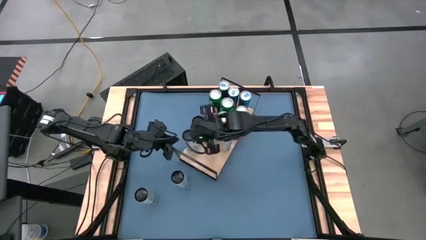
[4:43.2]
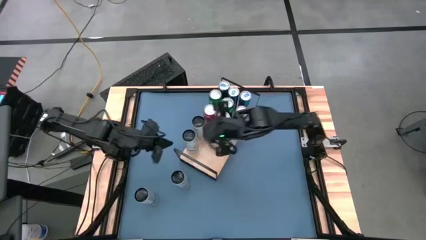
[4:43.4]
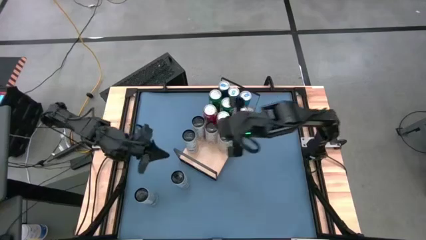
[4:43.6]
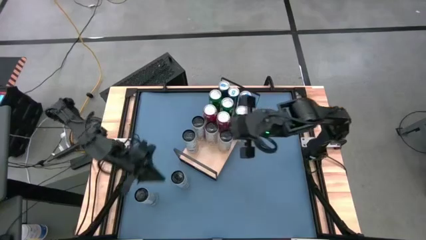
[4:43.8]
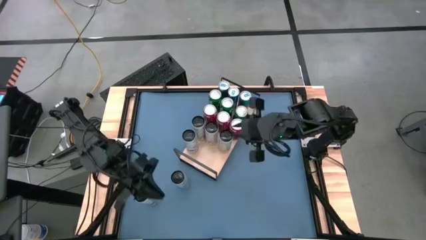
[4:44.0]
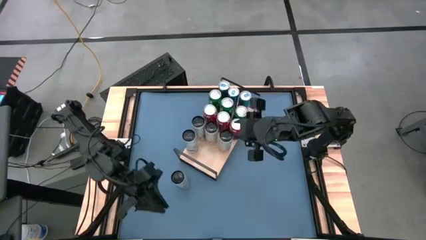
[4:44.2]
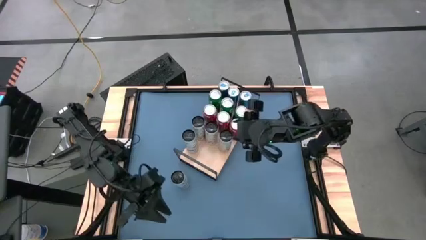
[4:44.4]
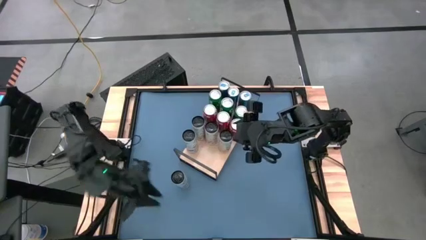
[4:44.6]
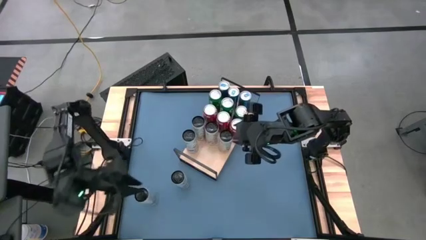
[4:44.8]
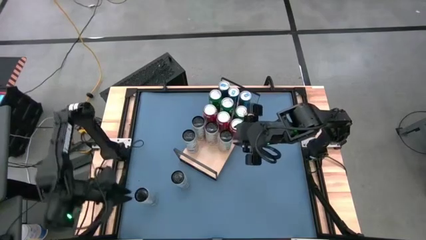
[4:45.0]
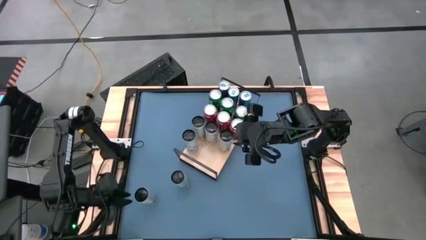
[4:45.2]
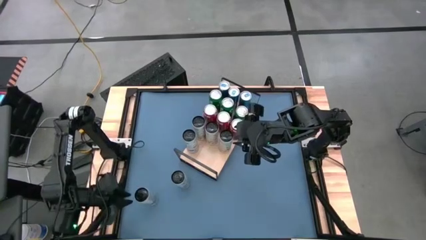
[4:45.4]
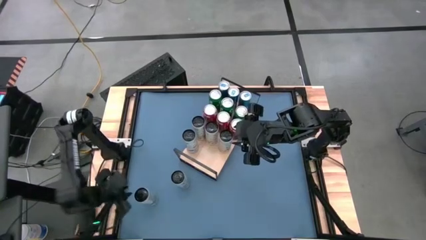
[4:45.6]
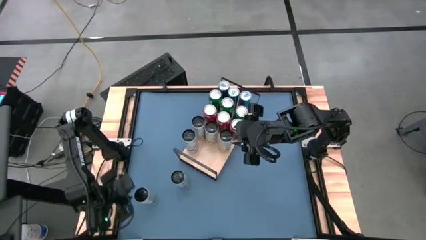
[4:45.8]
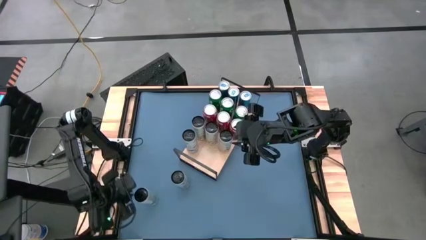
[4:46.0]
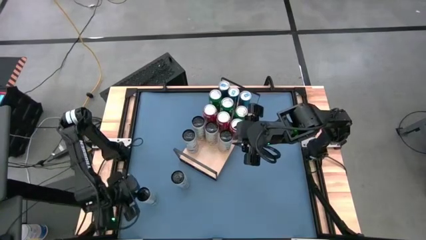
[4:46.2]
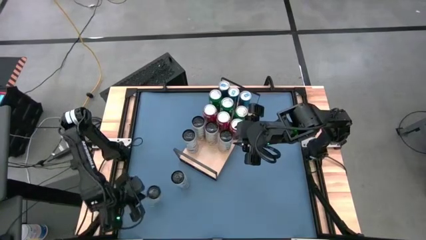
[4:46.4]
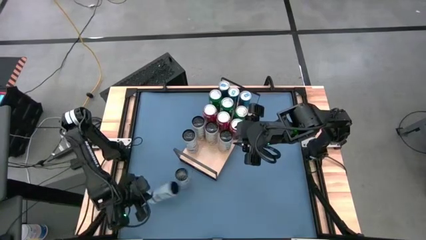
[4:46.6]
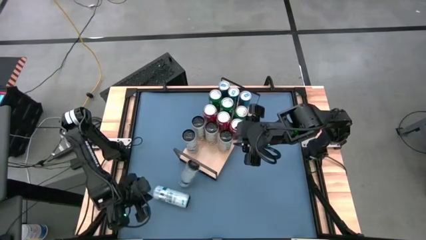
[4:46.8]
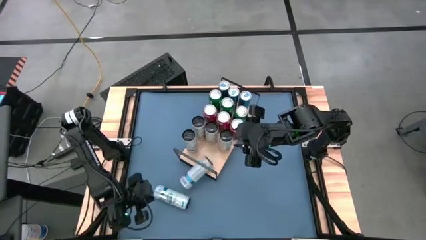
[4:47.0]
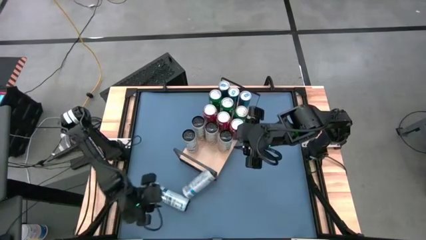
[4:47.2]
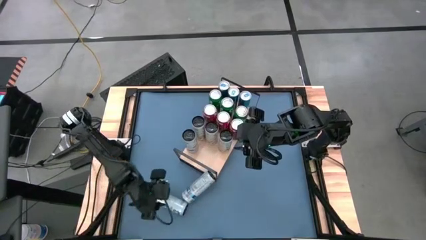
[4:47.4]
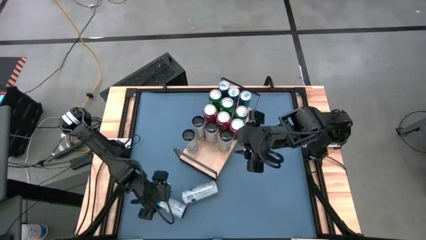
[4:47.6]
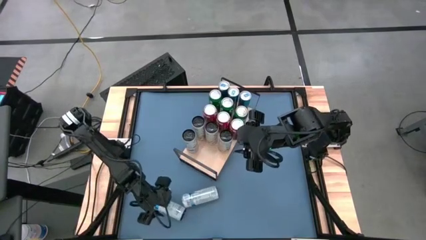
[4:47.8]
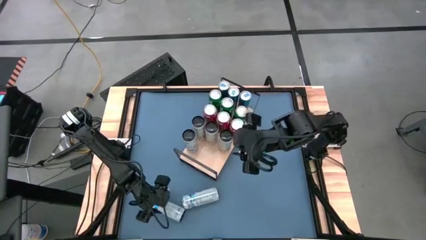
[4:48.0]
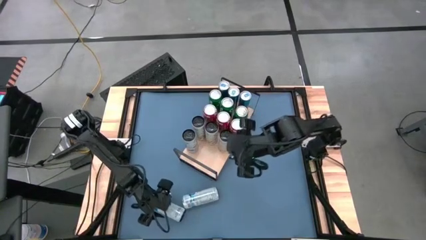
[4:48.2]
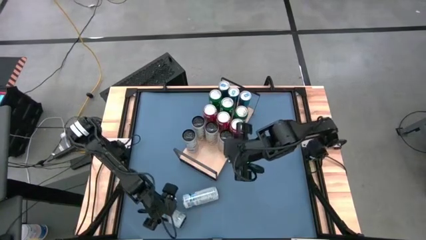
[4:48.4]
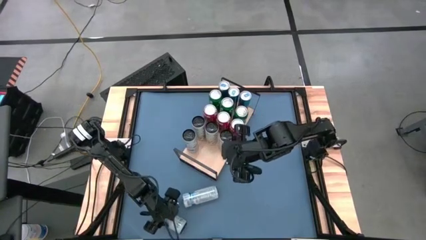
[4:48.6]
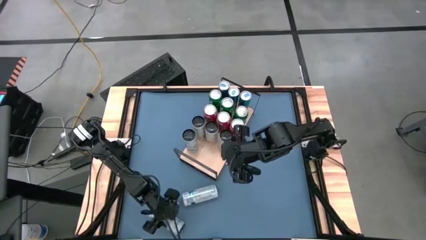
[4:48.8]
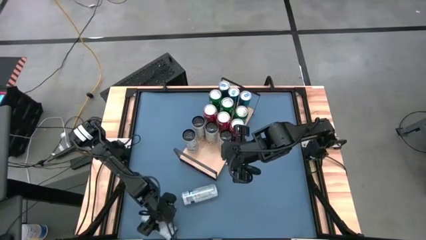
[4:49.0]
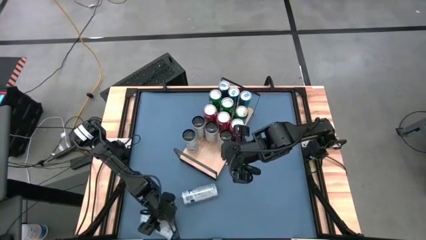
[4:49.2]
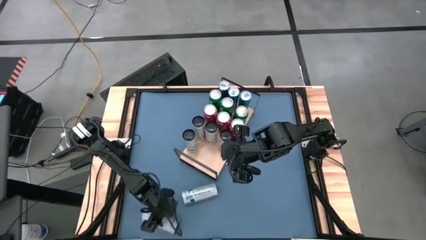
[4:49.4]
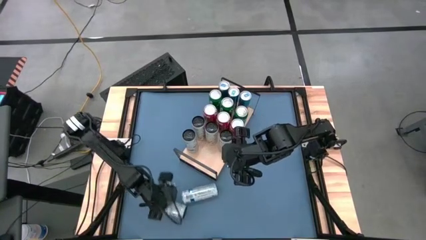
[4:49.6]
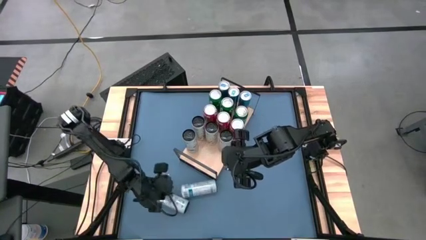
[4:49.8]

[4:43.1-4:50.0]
Task: Place canned beverage on shelf
Put left white blue soda can on the shelf aligned with the other white blue soda can

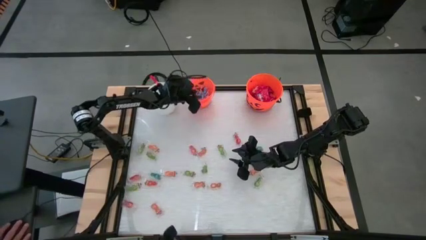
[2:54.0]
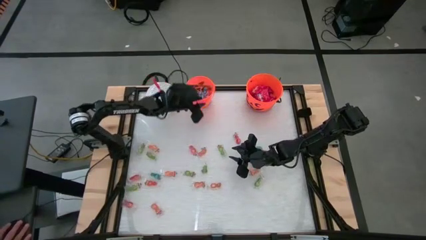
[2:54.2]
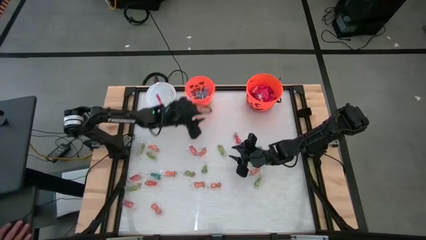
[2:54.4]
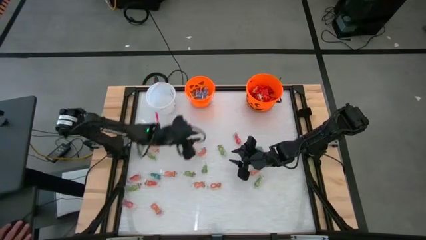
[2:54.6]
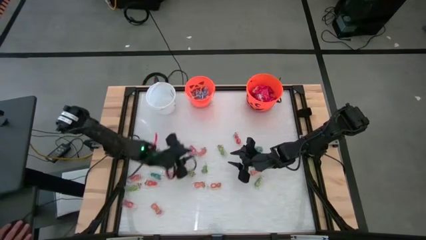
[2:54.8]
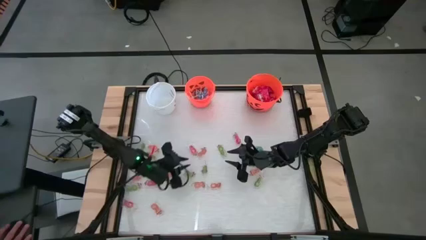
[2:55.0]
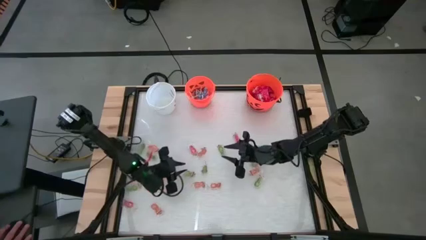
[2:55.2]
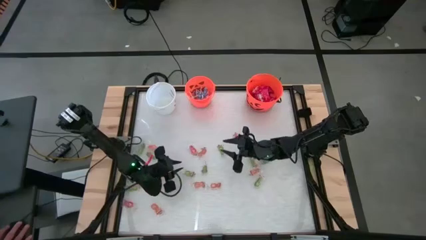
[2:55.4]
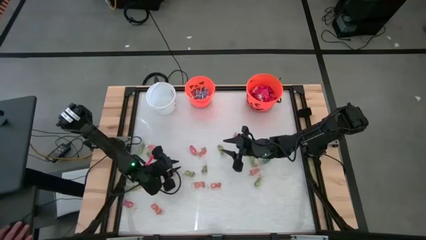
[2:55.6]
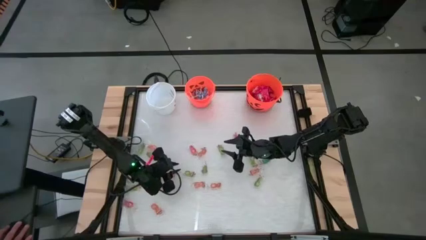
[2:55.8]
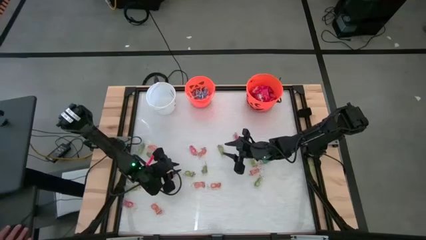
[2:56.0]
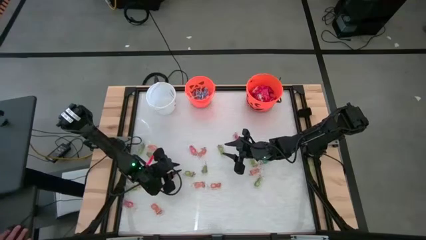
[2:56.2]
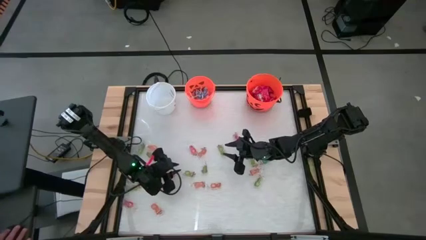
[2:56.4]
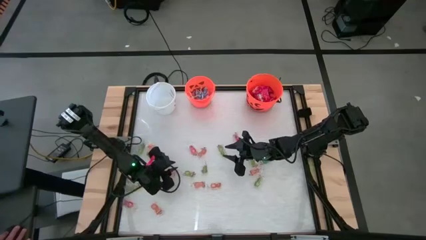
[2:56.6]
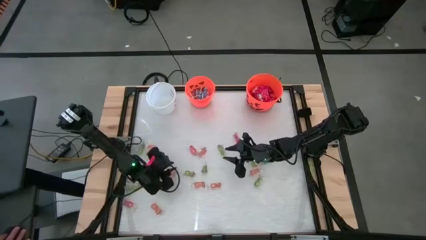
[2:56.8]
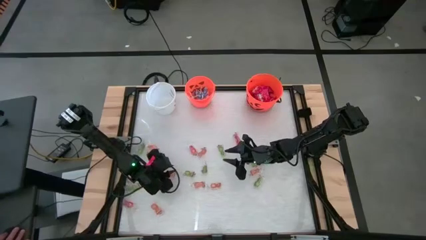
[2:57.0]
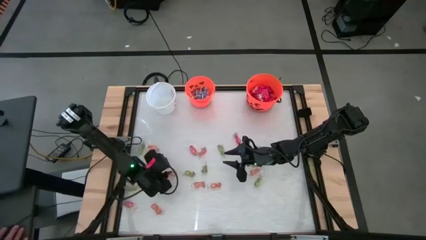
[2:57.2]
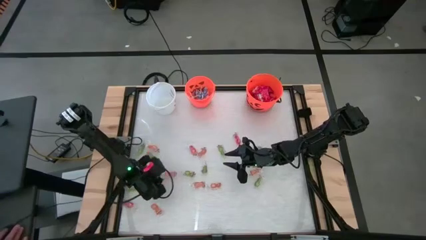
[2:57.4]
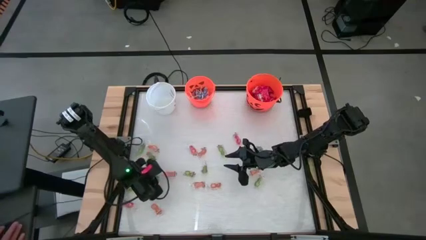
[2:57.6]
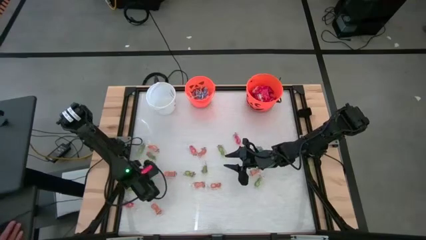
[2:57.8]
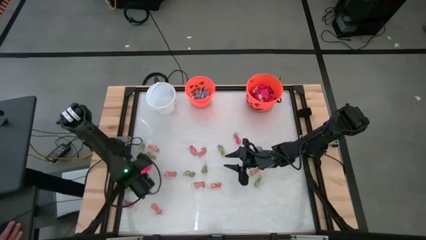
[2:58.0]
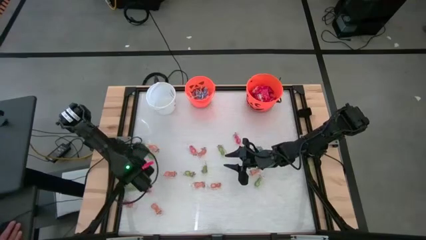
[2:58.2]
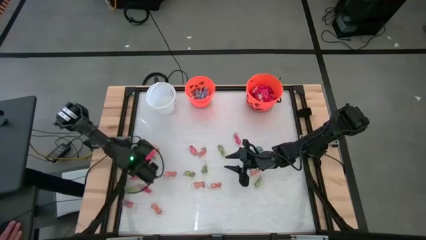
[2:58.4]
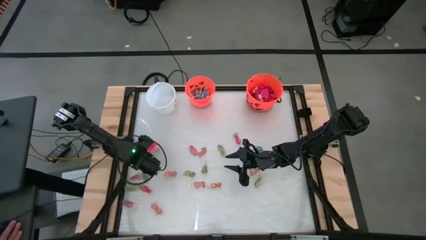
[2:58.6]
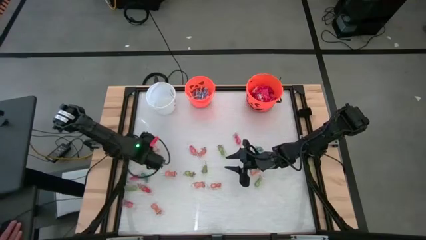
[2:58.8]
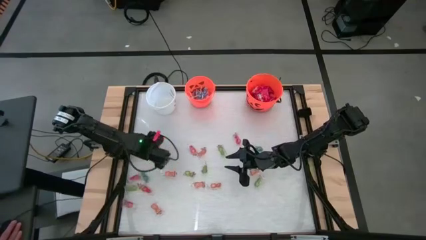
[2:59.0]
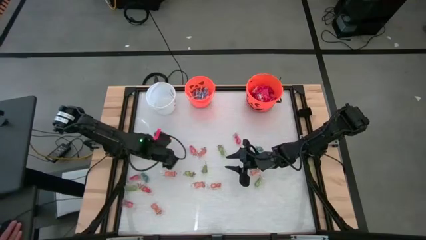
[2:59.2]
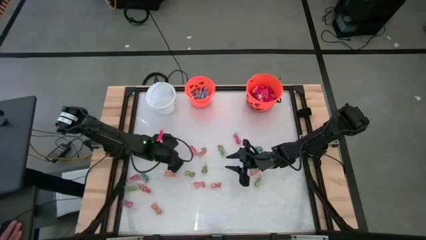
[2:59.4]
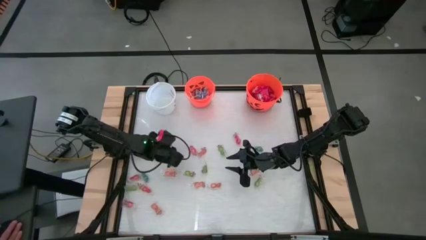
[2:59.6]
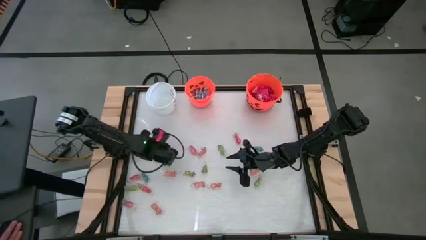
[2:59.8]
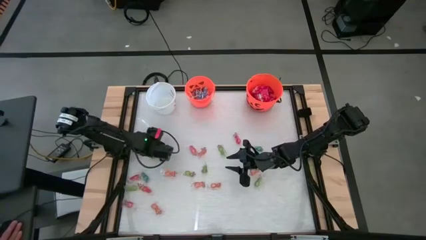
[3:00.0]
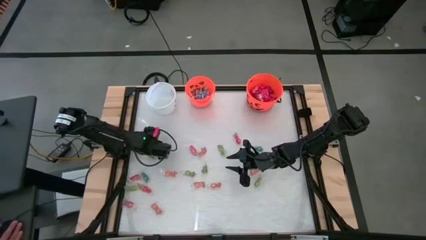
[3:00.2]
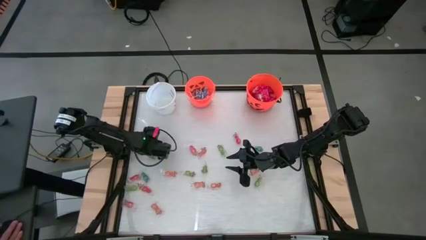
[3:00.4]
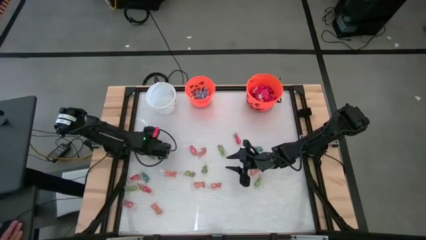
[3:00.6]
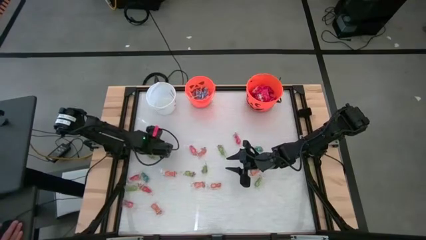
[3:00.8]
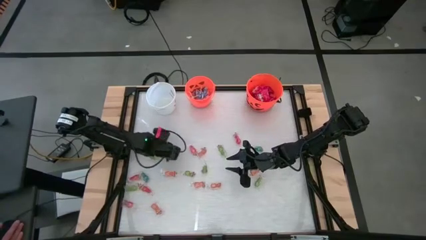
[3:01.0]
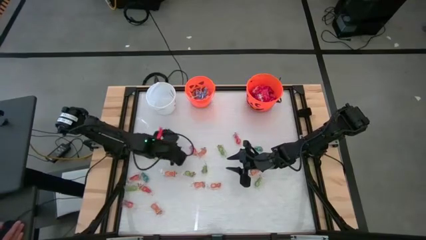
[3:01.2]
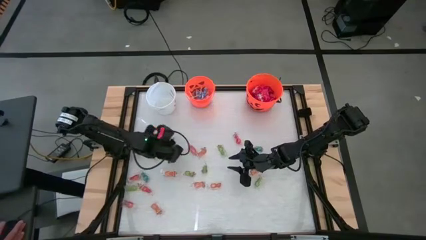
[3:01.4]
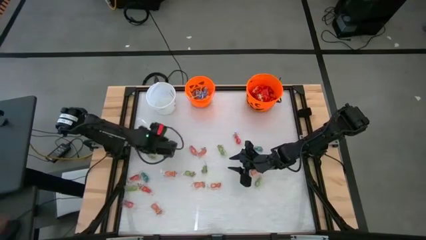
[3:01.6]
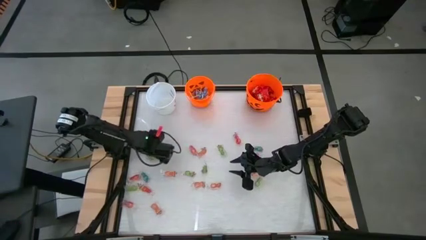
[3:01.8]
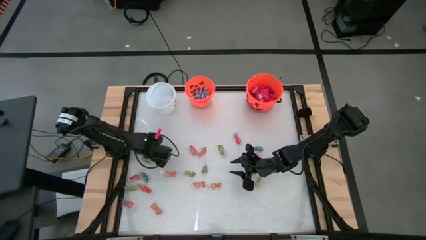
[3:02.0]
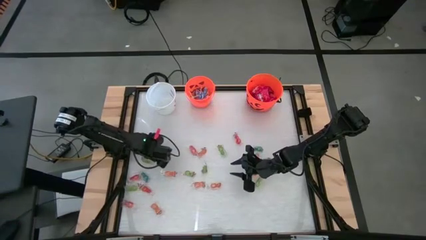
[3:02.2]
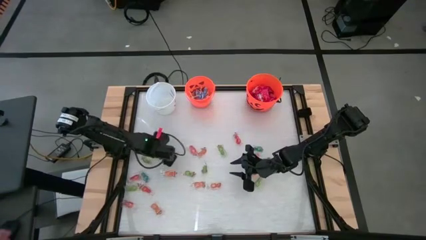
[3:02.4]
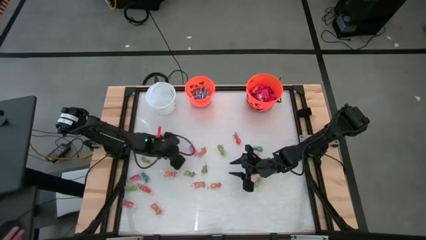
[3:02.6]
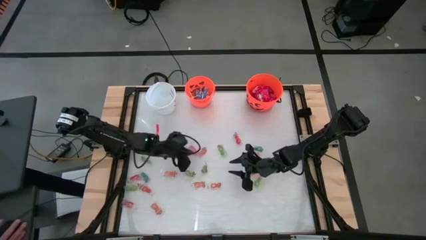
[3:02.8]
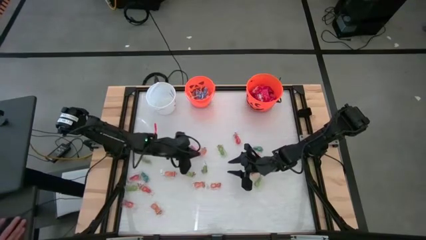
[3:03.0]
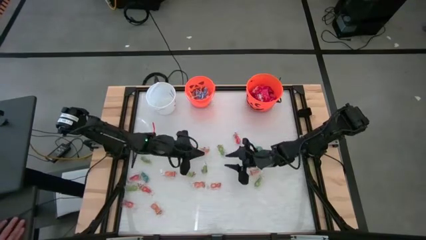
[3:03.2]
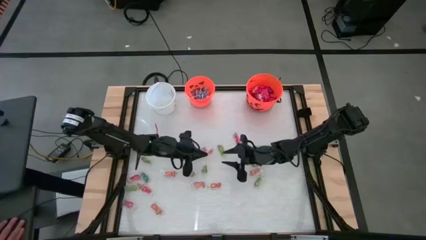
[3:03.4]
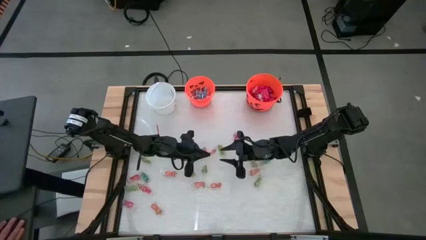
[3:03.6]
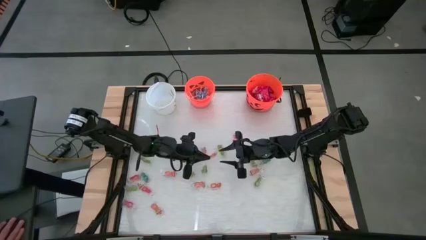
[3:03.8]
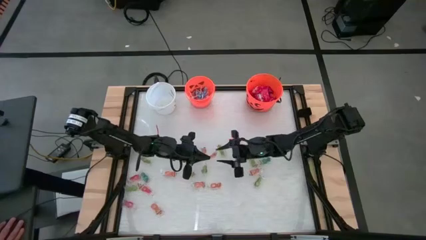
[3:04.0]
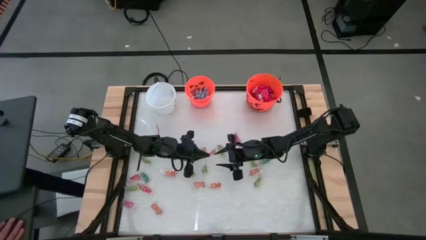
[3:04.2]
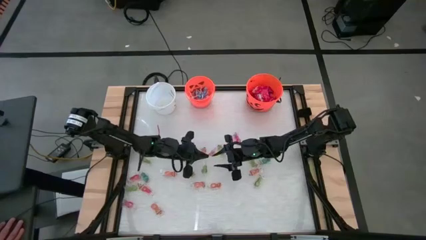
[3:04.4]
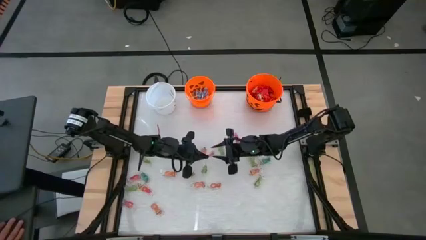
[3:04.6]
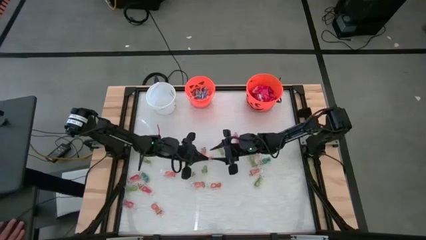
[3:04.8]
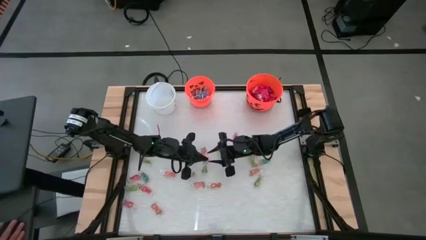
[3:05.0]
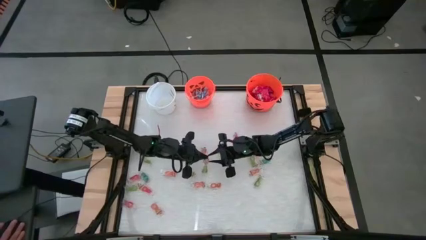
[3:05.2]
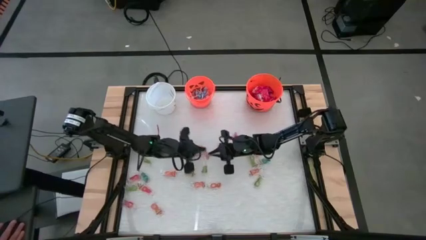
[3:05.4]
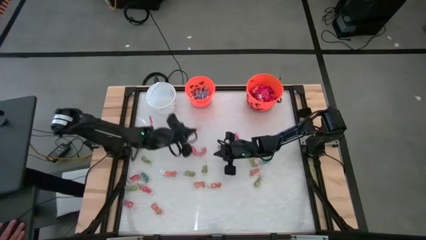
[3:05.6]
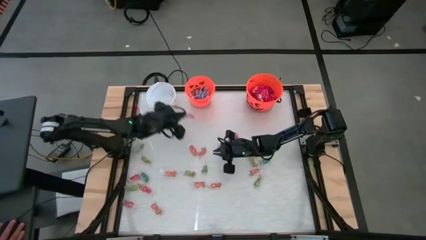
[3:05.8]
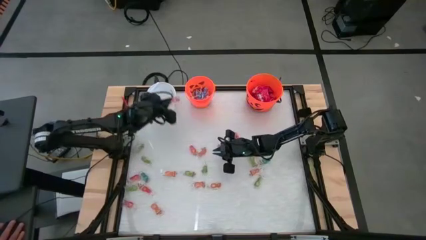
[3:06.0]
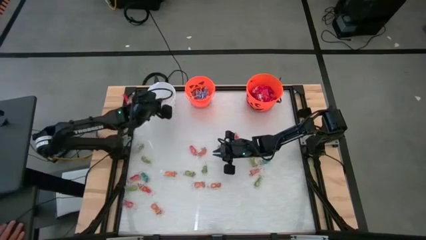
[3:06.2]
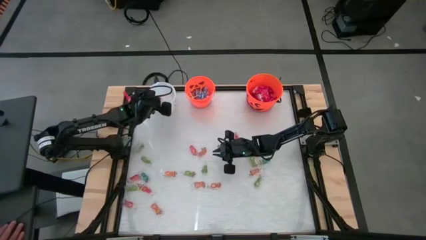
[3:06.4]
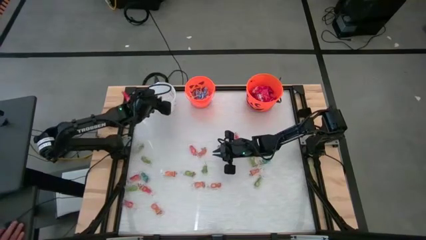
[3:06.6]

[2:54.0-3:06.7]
Task: Sort candy by brand, put in halloween buckets
Put the orange gummy into the white bucket
